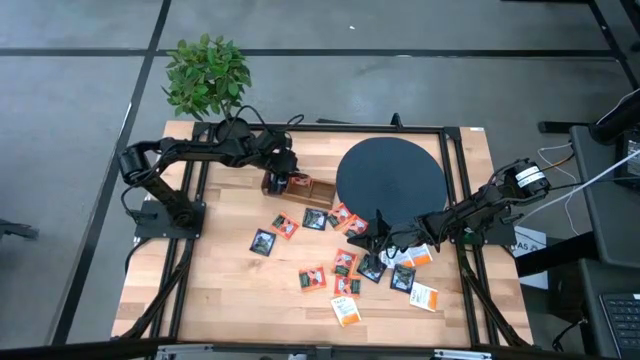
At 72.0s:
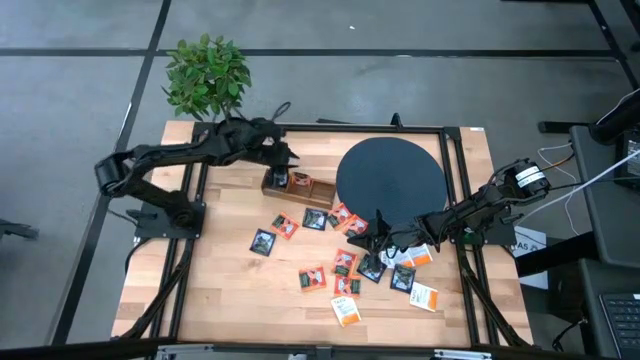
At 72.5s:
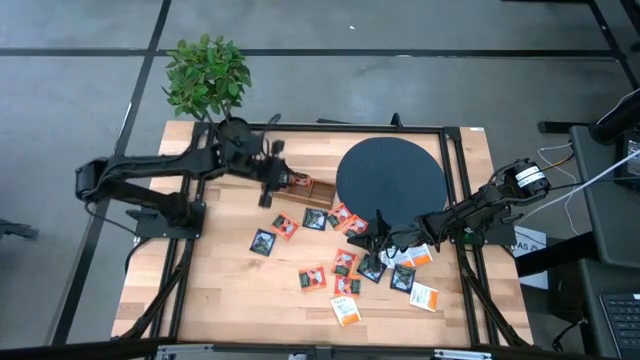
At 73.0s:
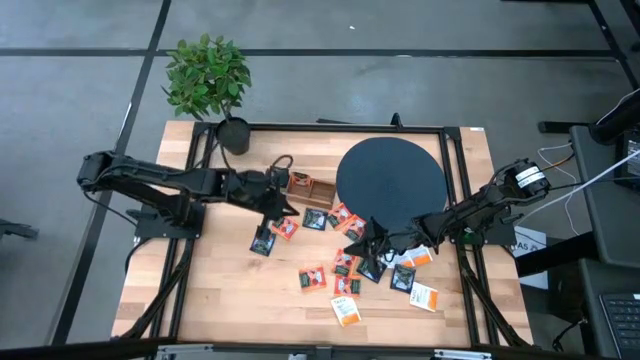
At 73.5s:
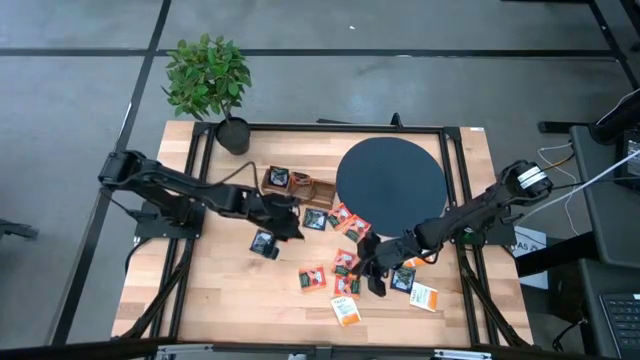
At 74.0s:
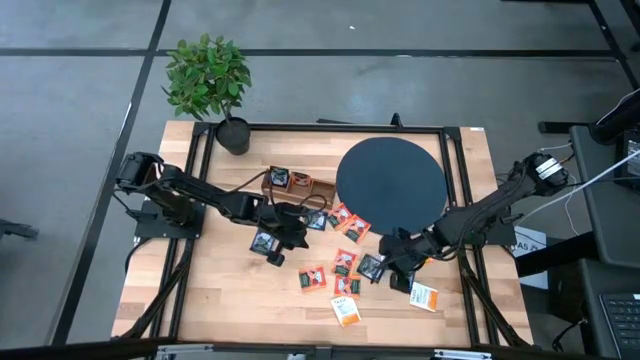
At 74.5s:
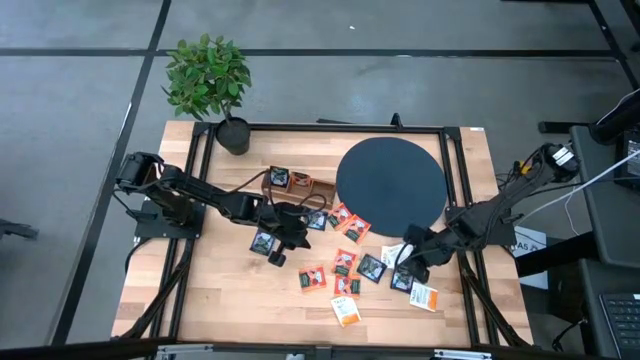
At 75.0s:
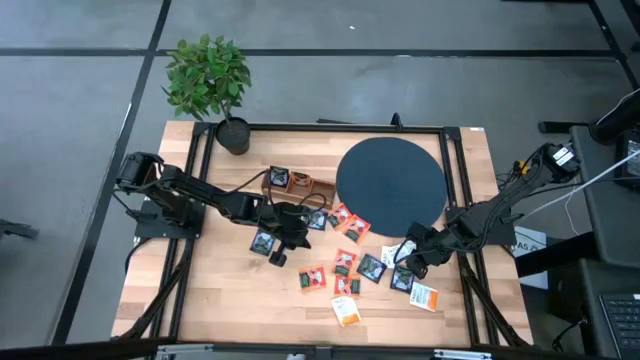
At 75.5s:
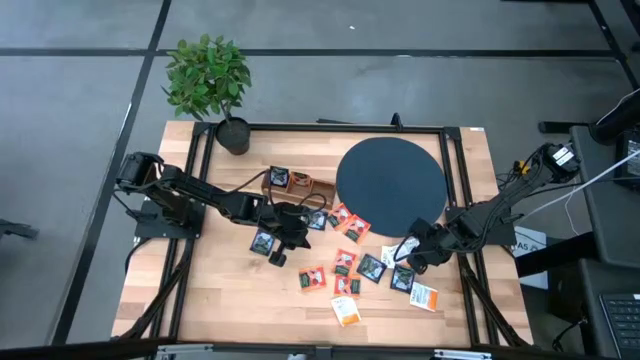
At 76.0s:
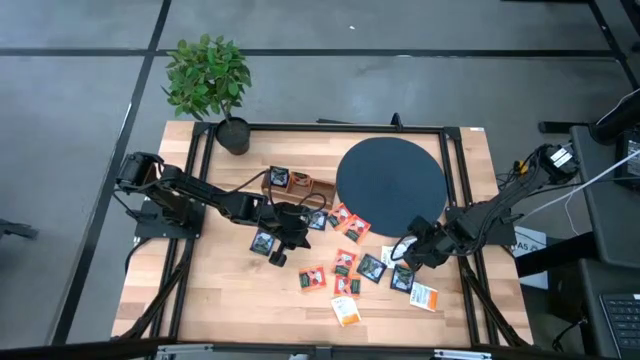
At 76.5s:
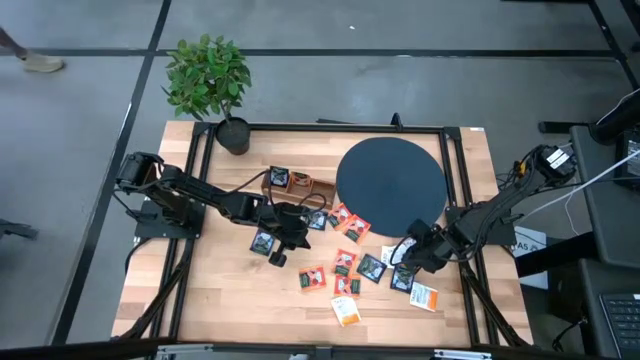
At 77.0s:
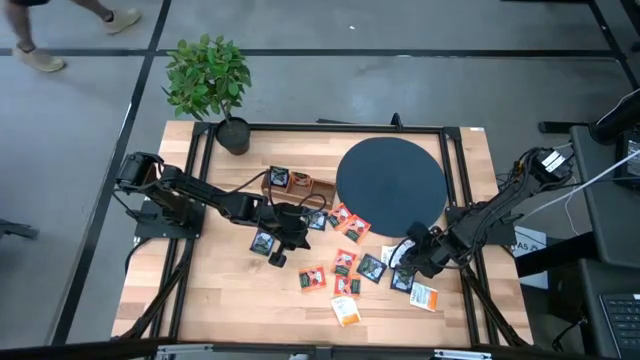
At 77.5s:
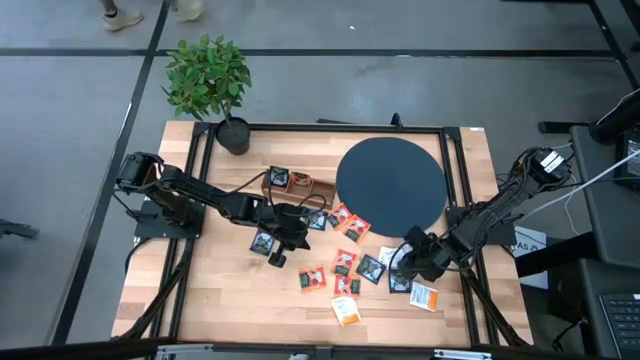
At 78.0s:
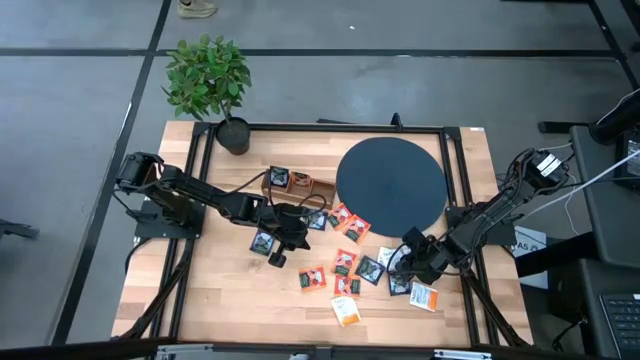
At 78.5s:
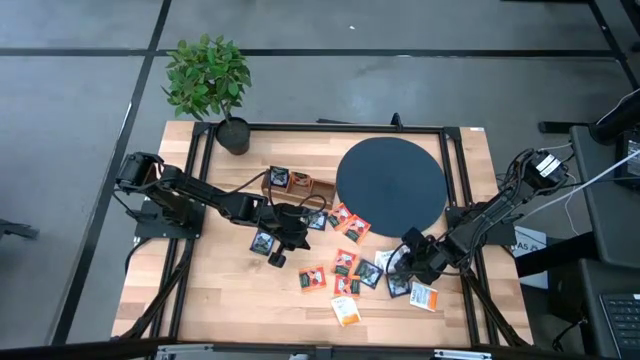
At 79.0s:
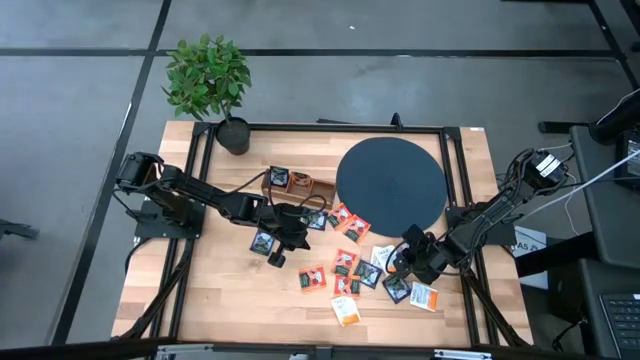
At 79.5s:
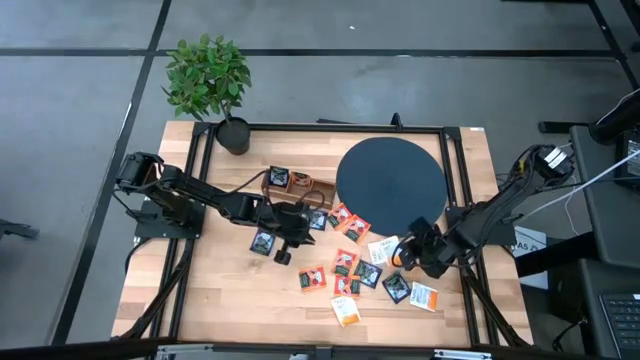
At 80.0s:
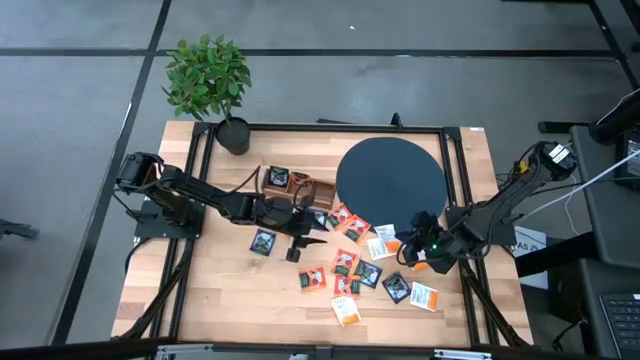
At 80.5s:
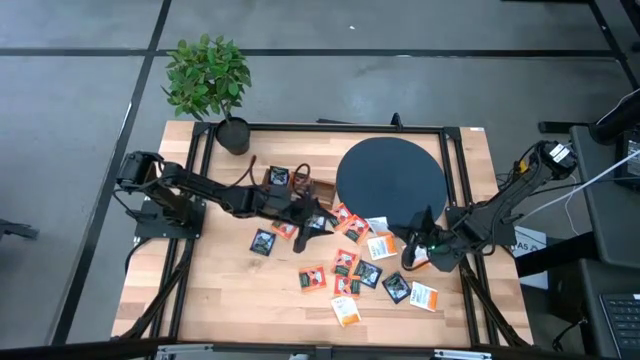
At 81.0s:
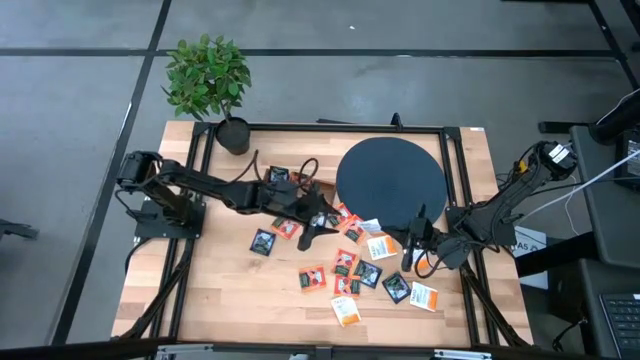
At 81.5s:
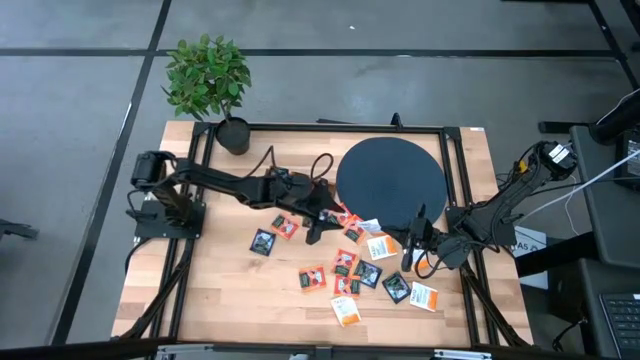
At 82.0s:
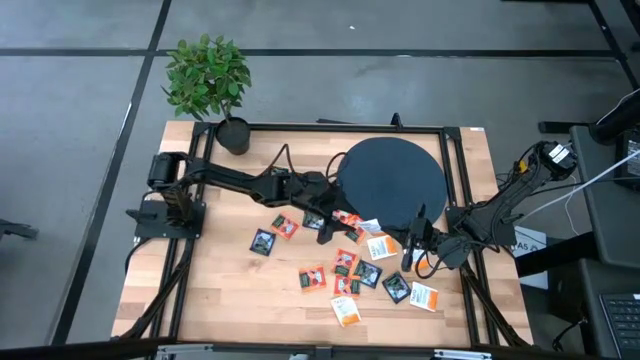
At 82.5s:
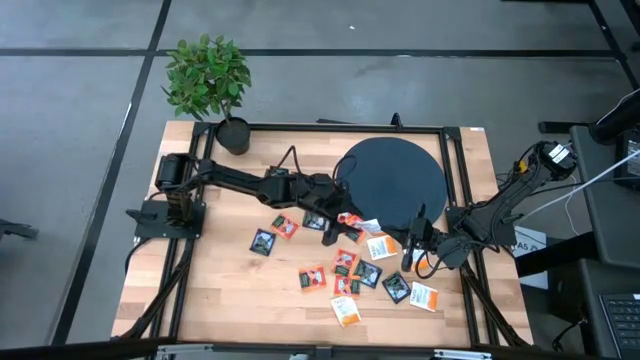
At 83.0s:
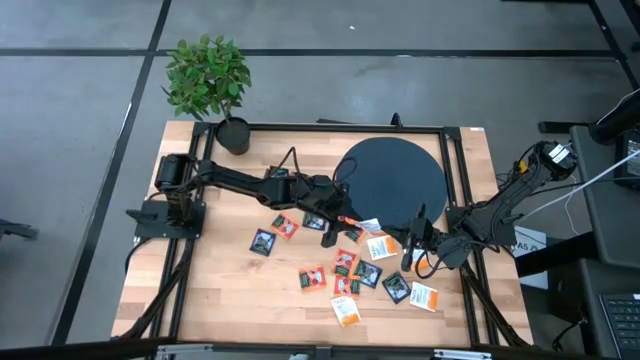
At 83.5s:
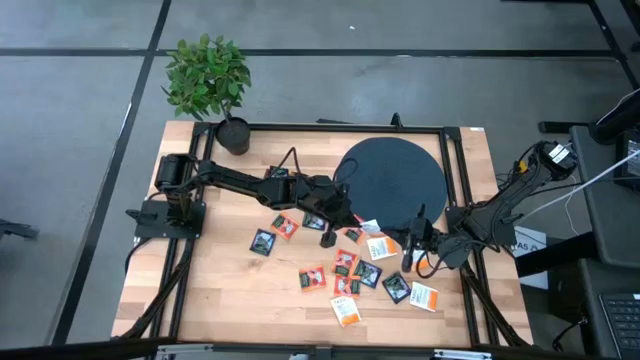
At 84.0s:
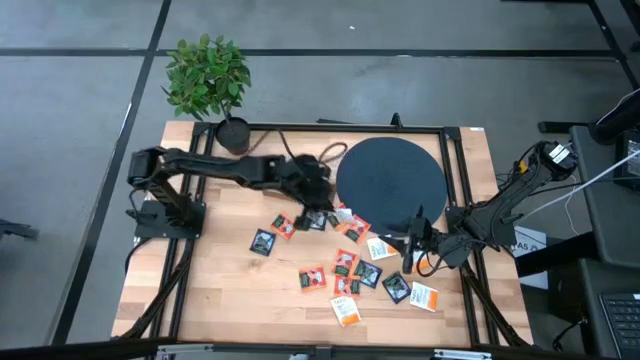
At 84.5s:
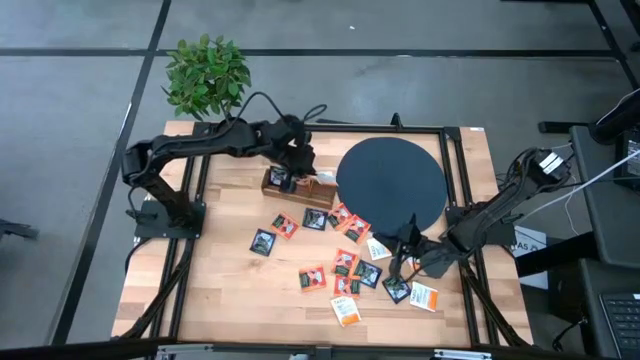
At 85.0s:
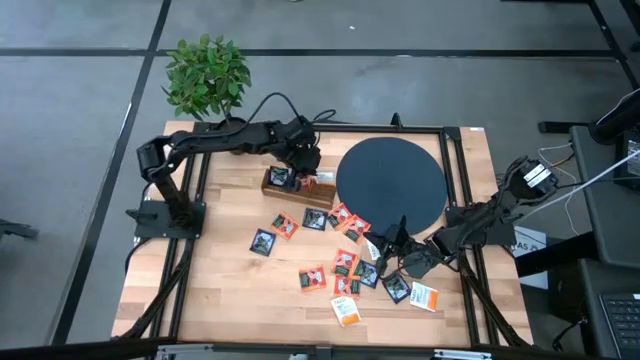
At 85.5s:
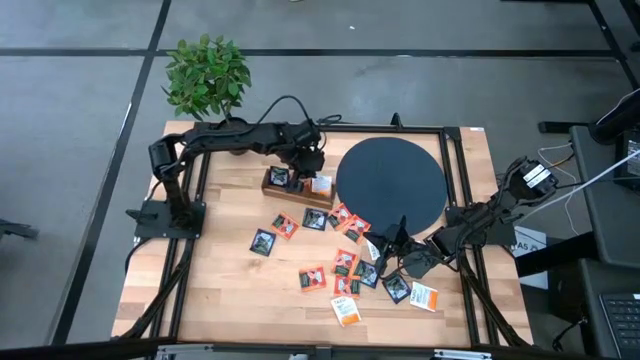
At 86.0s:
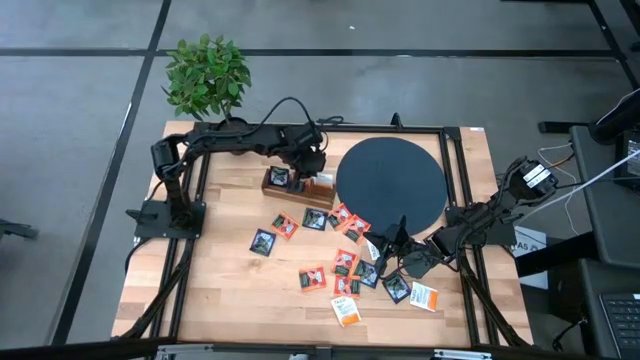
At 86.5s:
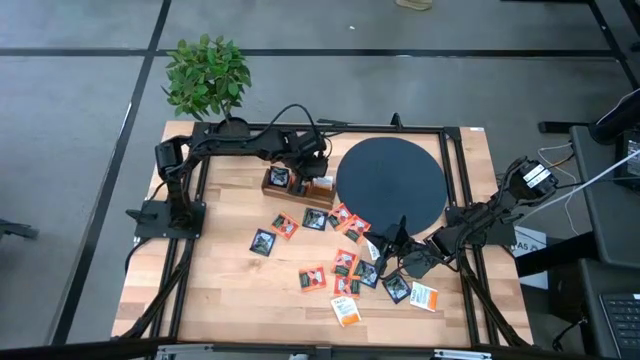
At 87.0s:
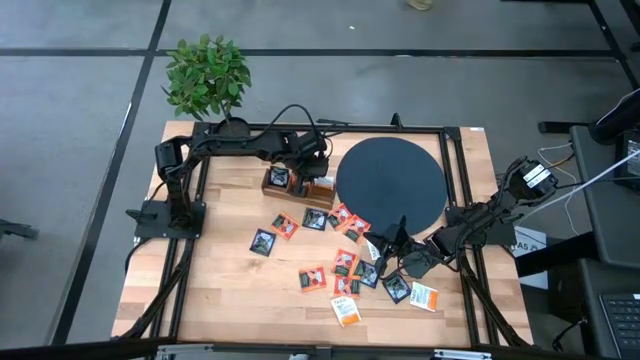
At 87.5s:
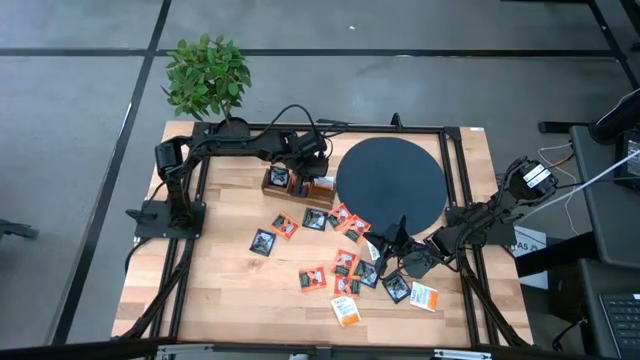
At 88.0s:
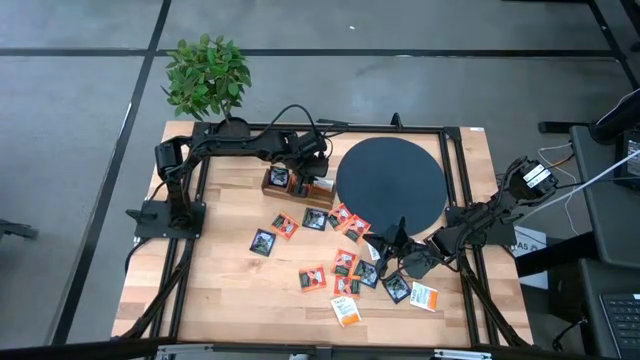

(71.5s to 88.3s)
Task: Pick & Place Tea
Put the white tea bag into the right section of the wooden organizer

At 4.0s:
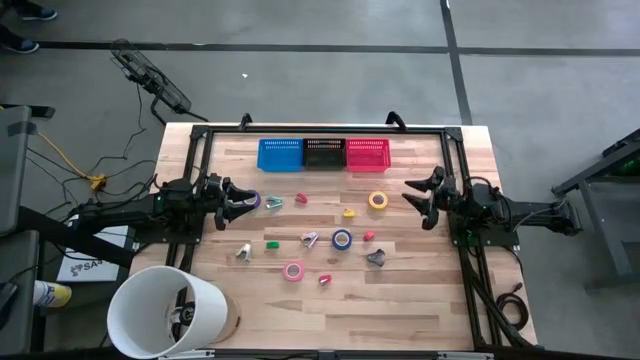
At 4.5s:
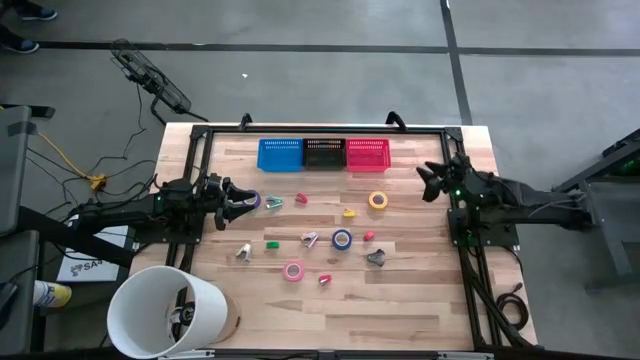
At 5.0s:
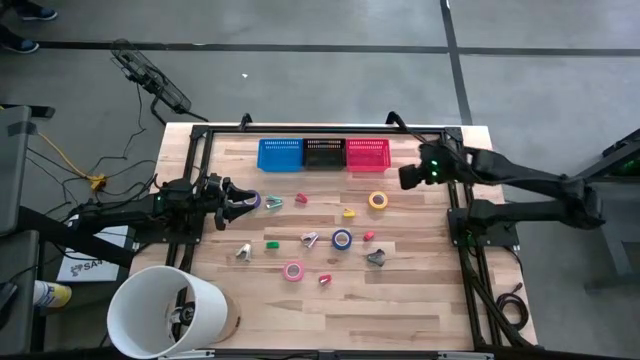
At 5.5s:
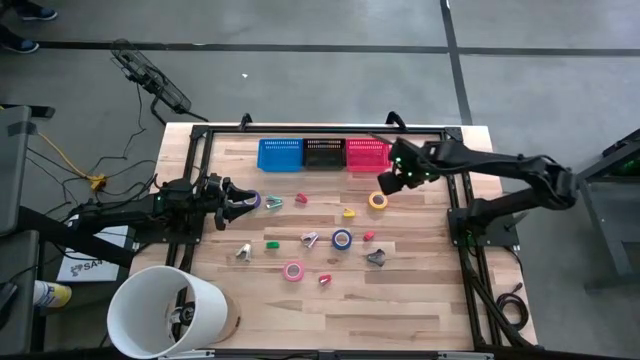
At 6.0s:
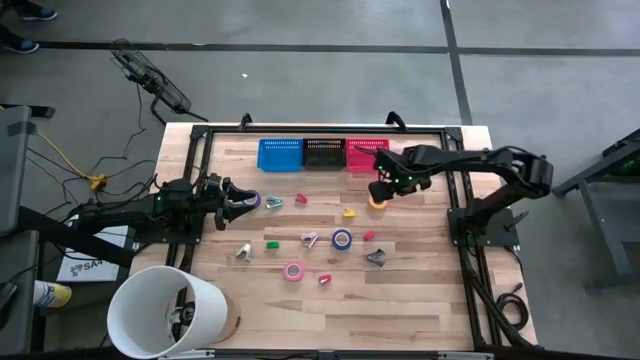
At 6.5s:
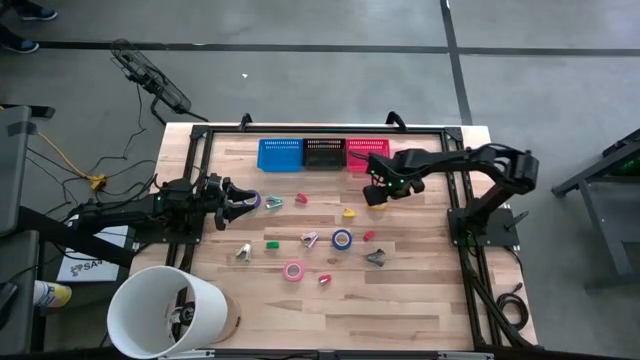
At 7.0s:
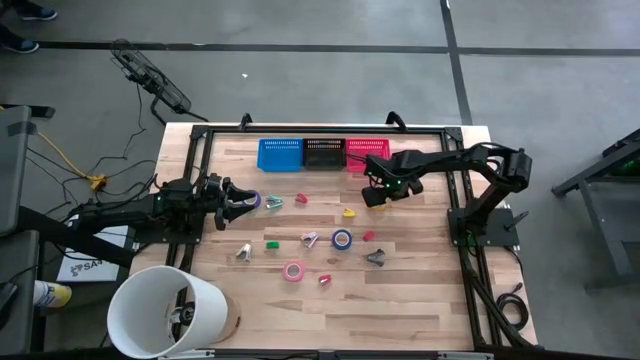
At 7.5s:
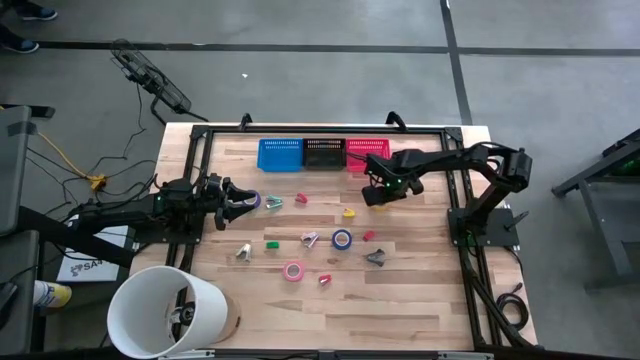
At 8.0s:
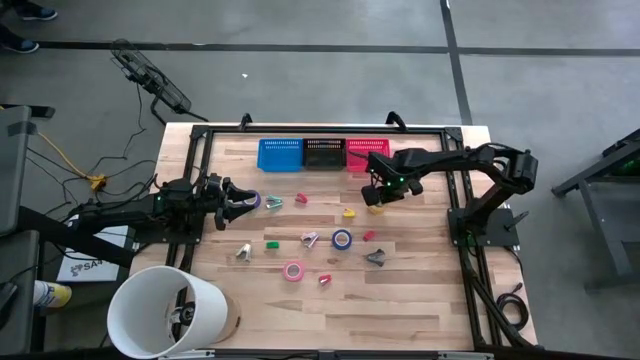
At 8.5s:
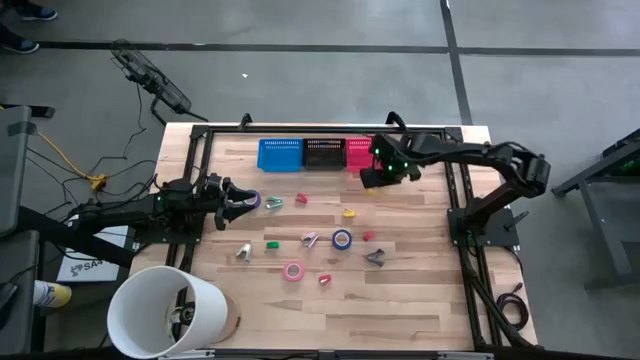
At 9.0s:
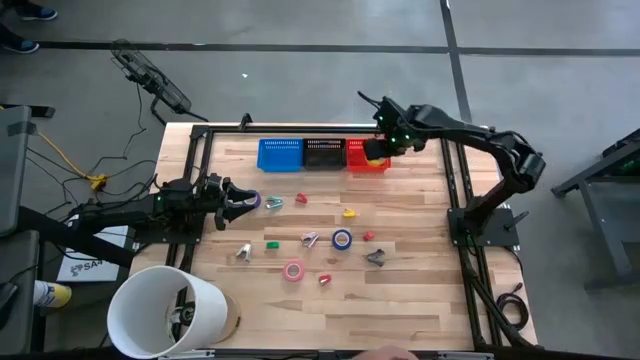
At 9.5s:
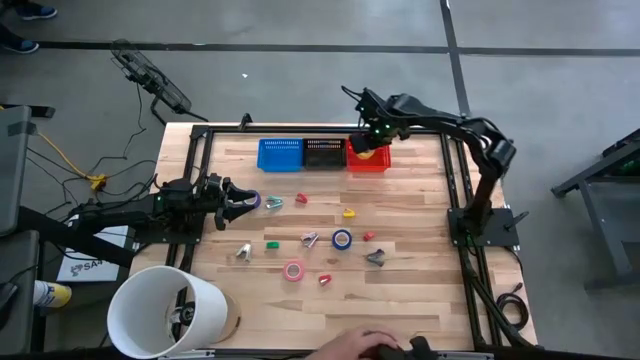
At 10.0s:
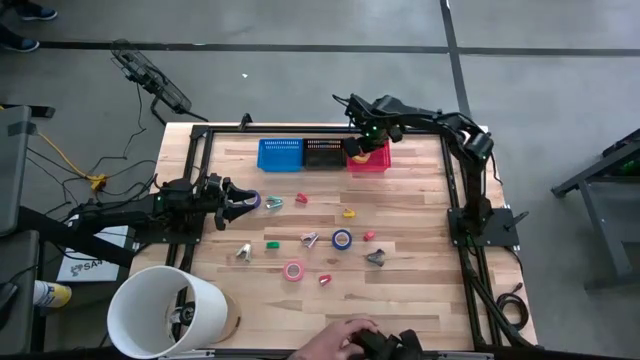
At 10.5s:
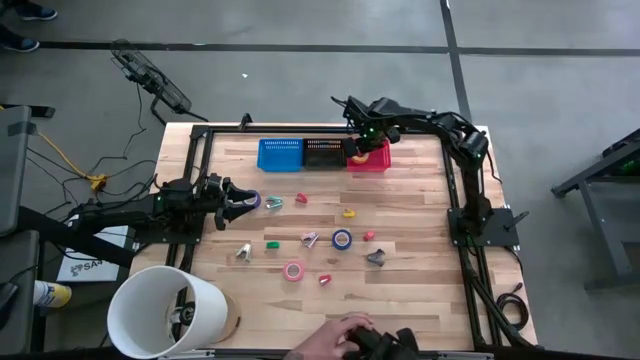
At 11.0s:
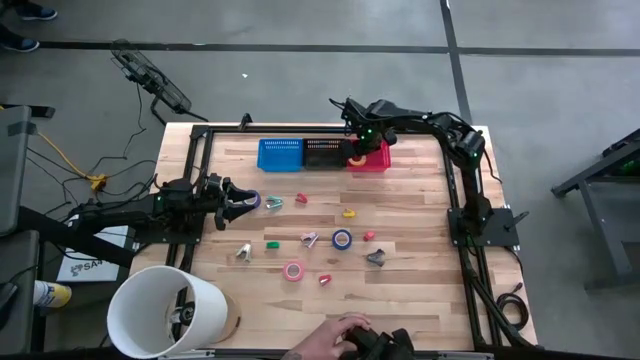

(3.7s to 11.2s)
Task: Pick and place Stapler, Stapler remover, tape
Put the yellow tape into the red bin
